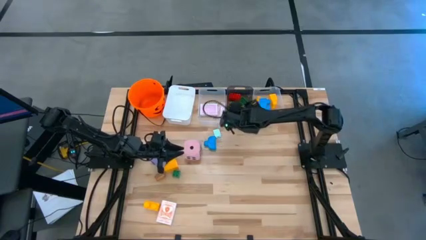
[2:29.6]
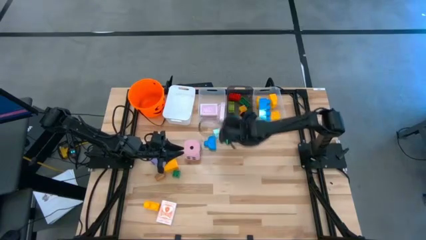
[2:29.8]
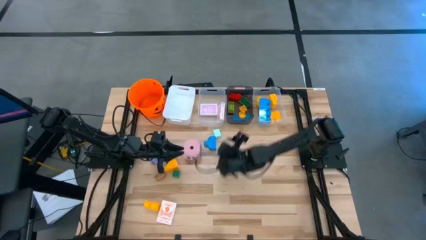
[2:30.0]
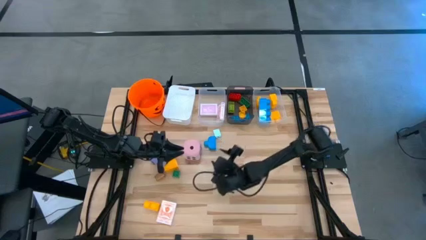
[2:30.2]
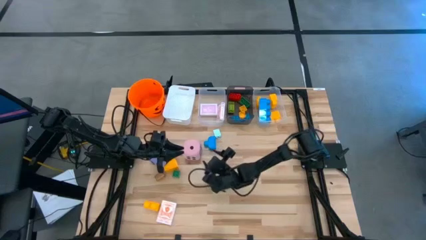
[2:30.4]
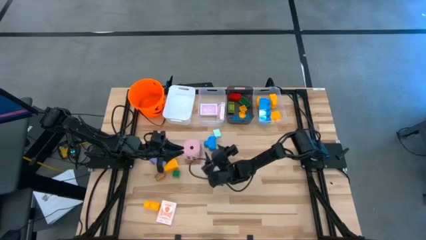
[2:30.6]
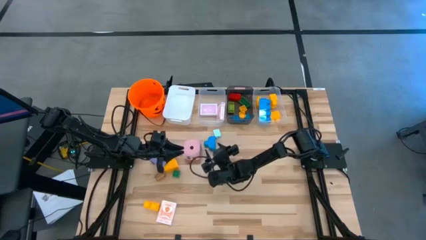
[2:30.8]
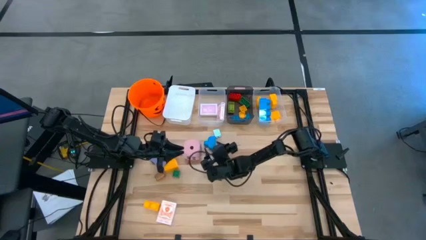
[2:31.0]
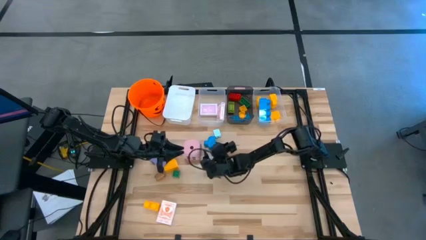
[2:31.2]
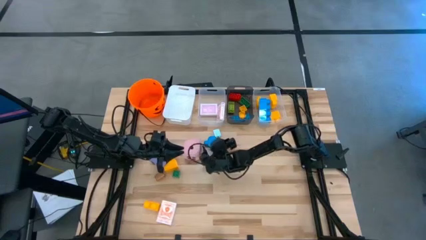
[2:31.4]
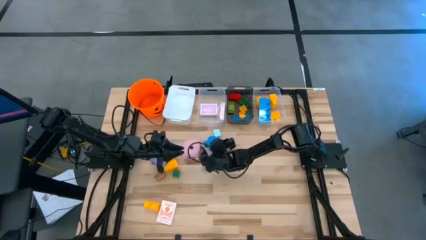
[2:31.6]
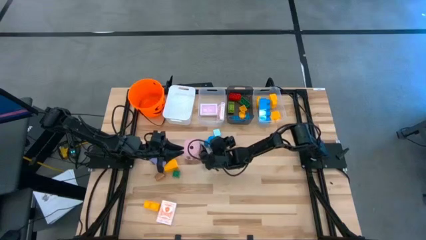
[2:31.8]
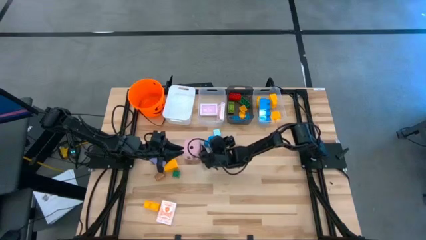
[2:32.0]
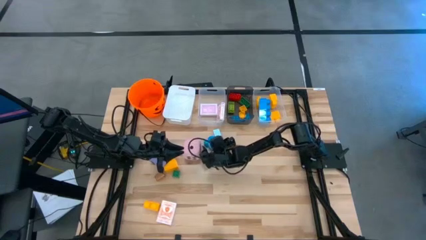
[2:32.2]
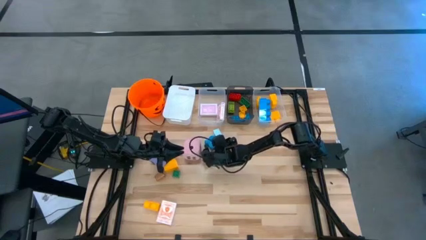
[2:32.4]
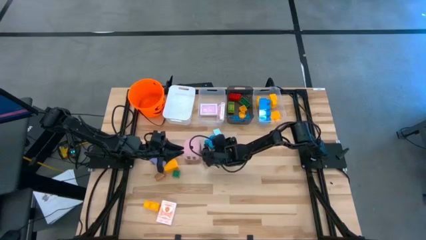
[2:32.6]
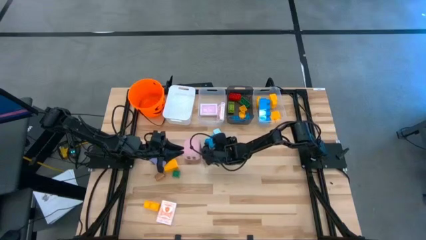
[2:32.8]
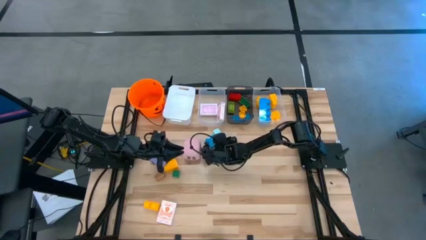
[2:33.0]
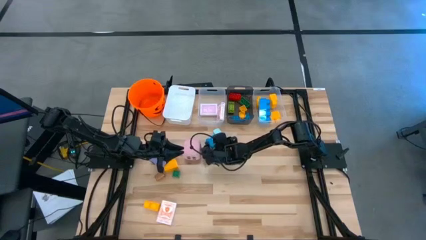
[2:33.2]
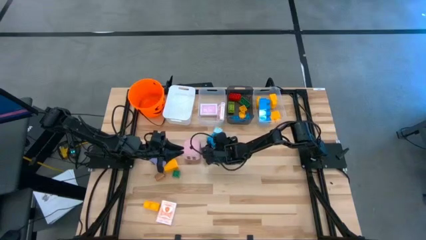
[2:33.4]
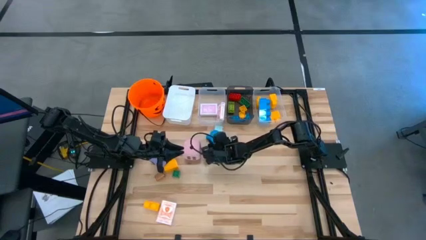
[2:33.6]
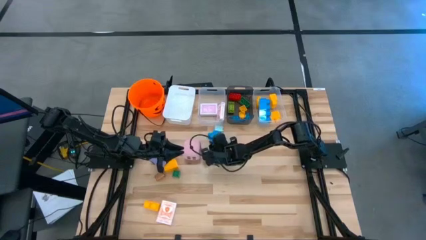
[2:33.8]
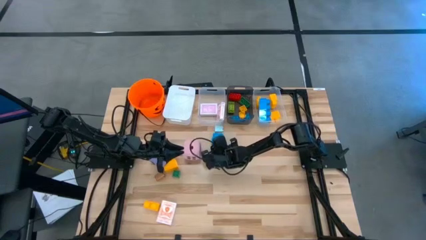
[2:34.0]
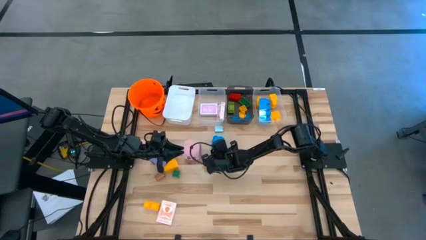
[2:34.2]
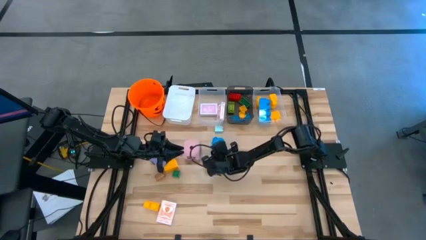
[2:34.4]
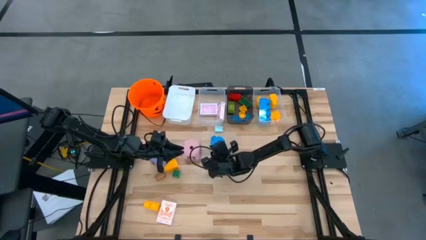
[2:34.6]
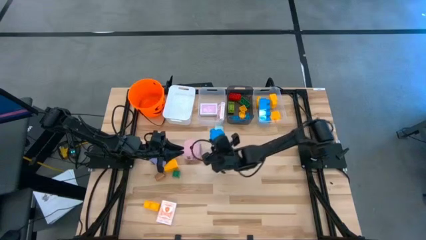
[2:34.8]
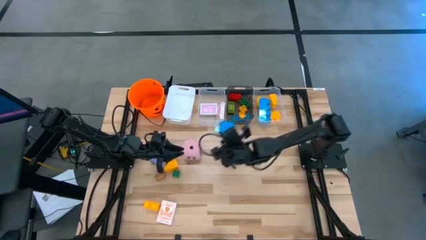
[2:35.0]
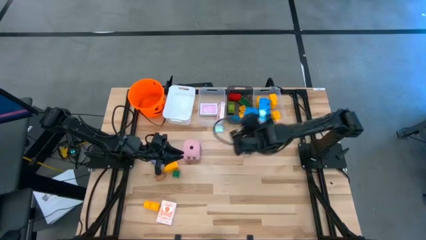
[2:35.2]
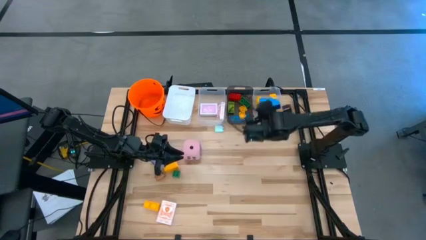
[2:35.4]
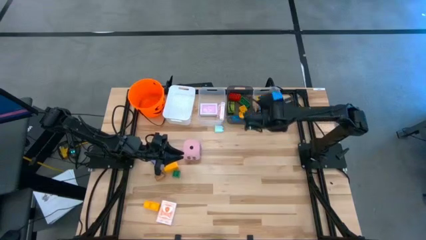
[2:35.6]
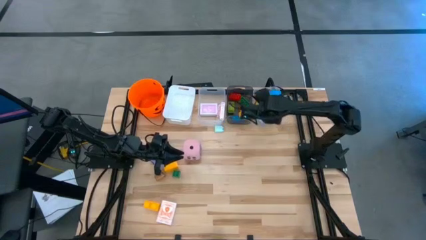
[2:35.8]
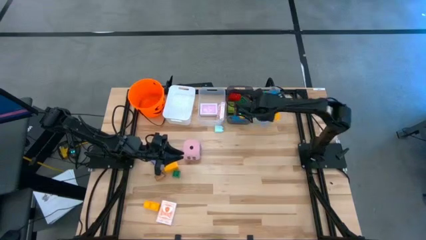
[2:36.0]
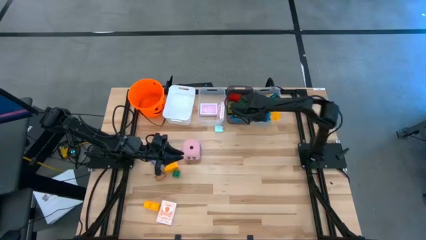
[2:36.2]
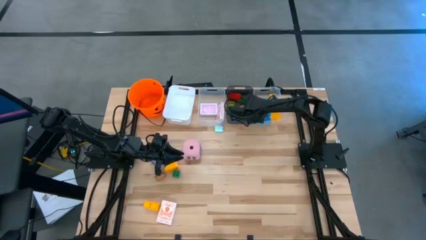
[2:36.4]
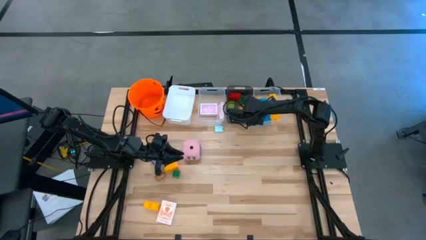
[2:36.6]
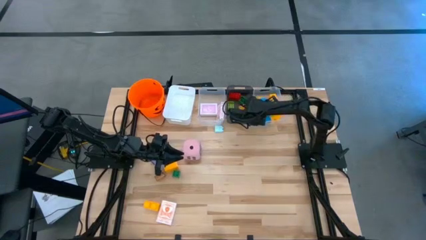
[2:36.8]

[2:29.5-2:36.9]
Task: Pick & Place Toys
Put the big blue game piece into the right transparent bin
